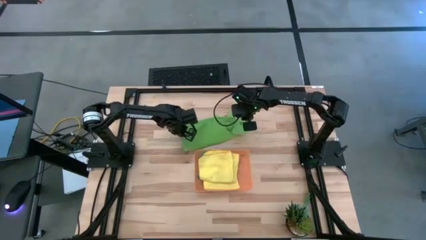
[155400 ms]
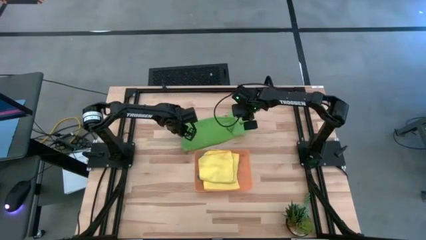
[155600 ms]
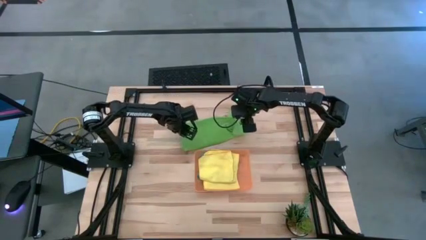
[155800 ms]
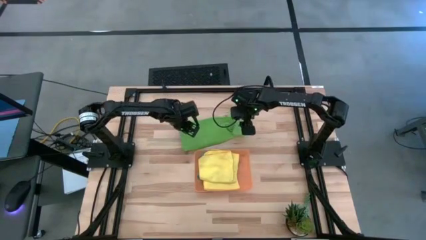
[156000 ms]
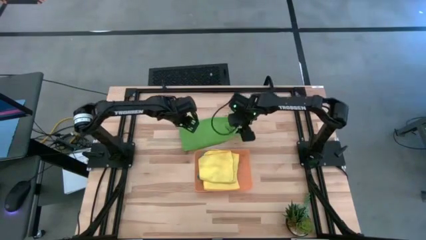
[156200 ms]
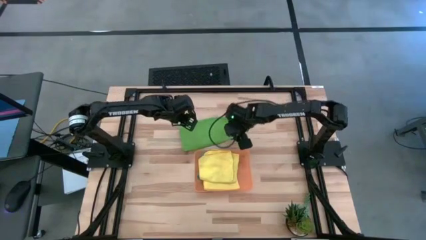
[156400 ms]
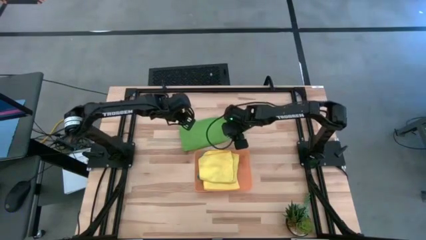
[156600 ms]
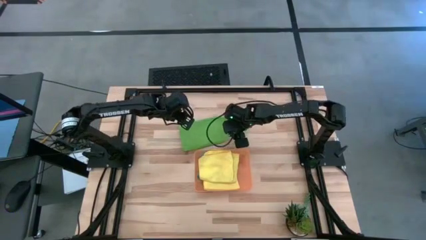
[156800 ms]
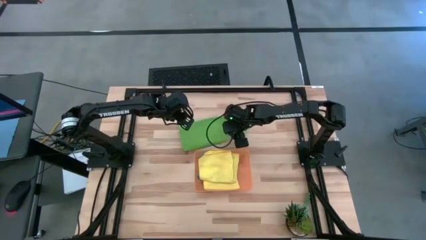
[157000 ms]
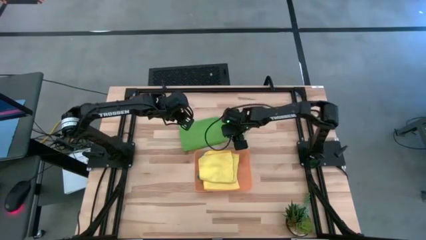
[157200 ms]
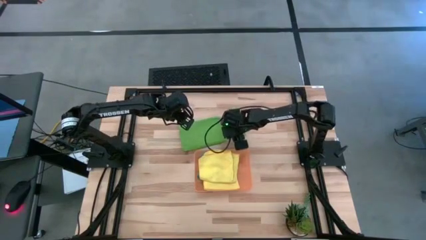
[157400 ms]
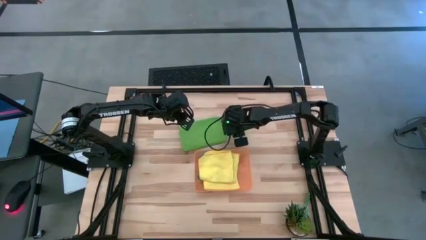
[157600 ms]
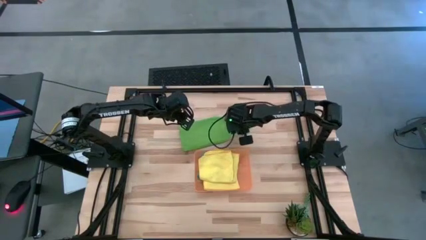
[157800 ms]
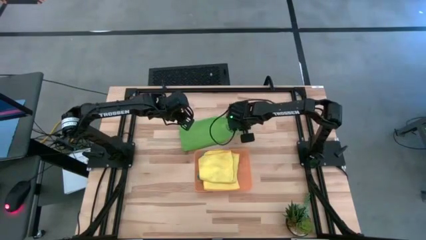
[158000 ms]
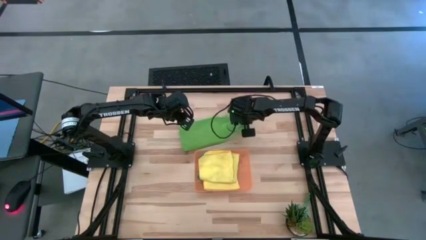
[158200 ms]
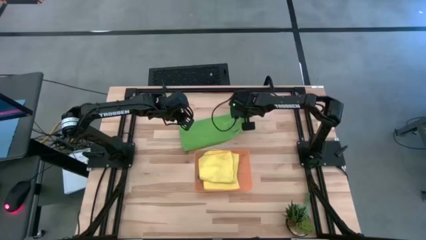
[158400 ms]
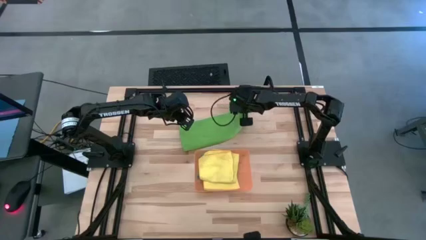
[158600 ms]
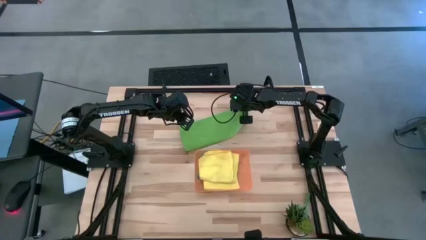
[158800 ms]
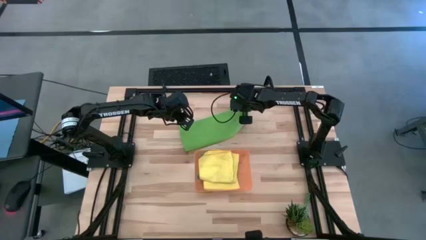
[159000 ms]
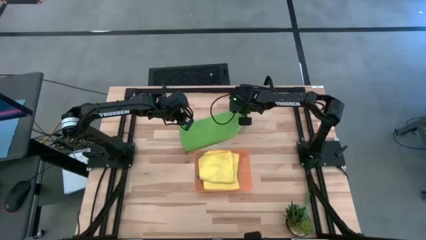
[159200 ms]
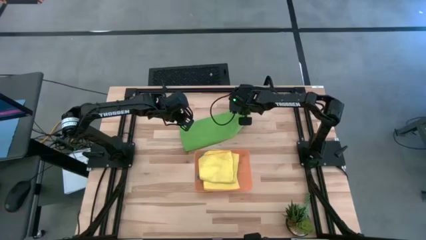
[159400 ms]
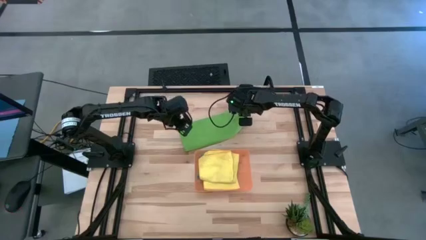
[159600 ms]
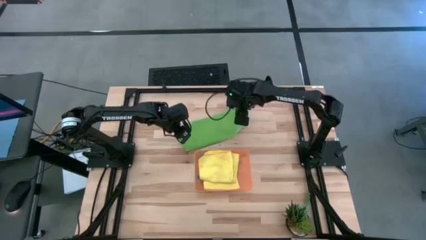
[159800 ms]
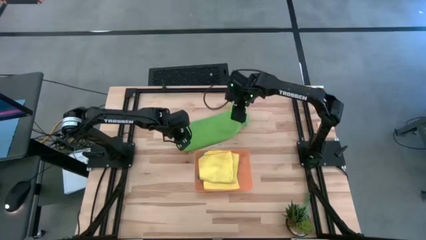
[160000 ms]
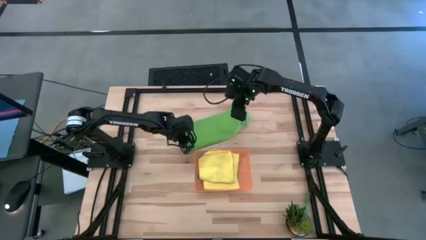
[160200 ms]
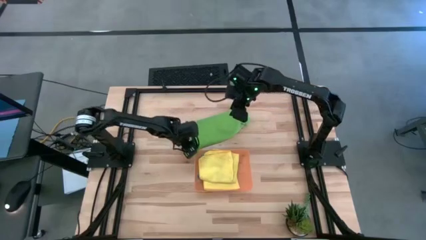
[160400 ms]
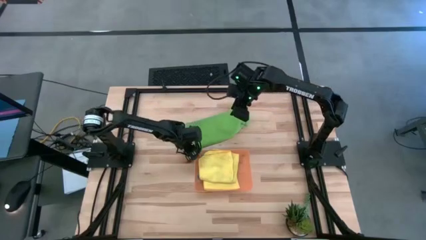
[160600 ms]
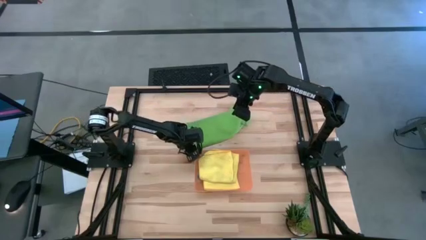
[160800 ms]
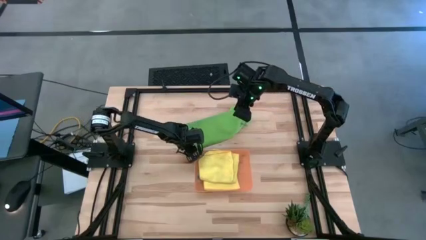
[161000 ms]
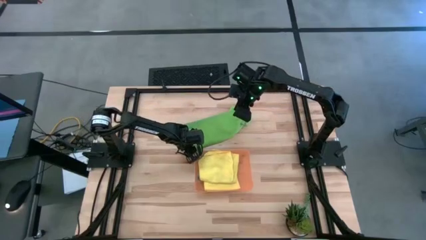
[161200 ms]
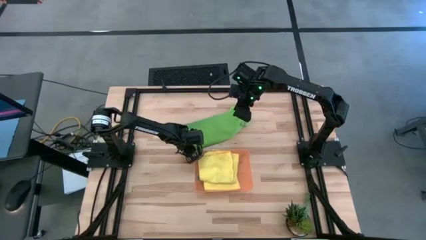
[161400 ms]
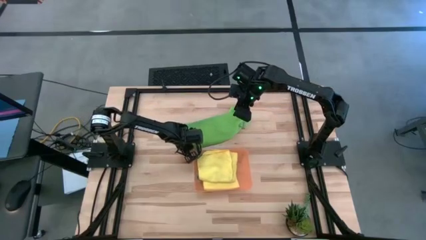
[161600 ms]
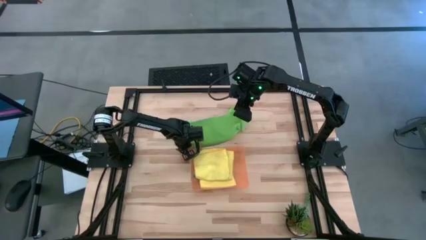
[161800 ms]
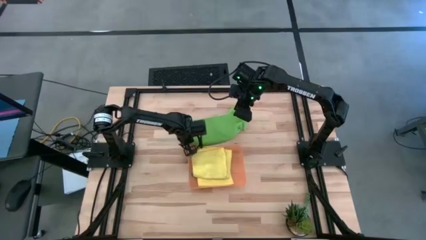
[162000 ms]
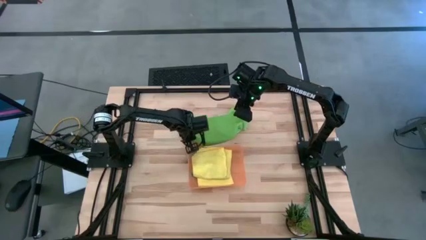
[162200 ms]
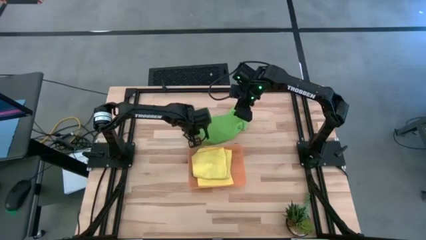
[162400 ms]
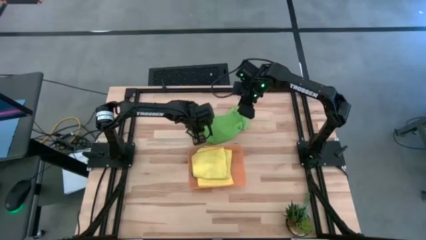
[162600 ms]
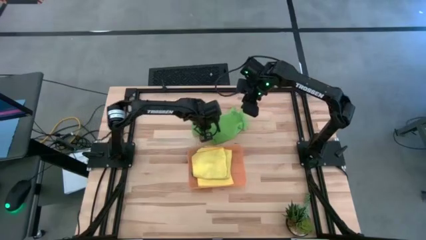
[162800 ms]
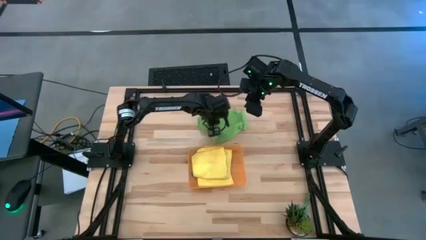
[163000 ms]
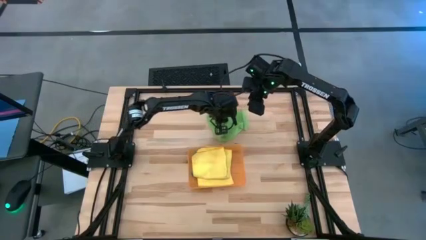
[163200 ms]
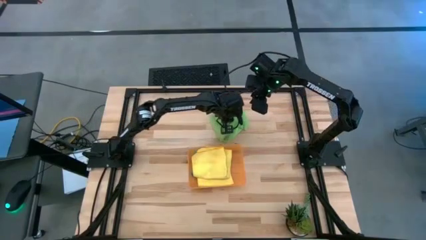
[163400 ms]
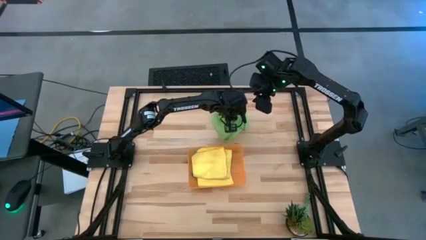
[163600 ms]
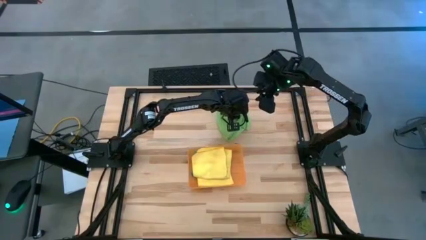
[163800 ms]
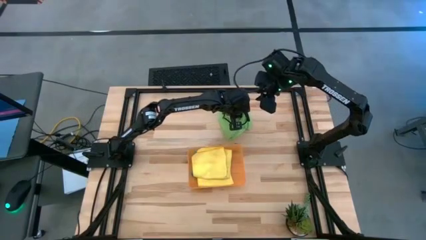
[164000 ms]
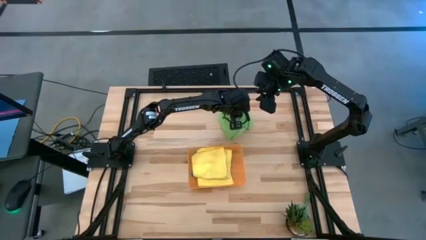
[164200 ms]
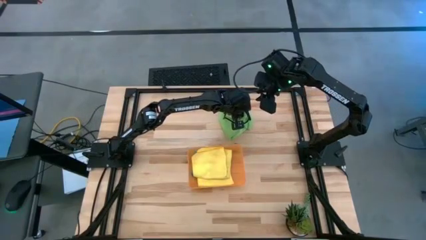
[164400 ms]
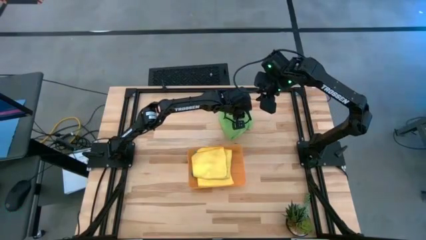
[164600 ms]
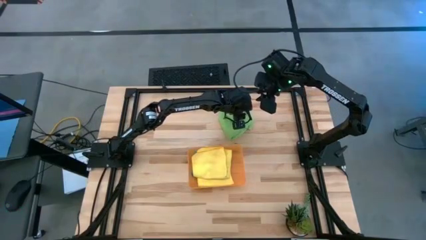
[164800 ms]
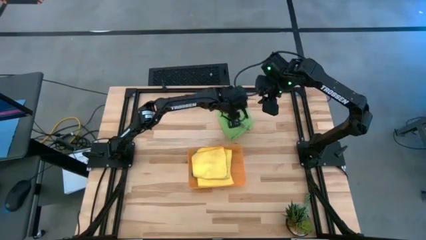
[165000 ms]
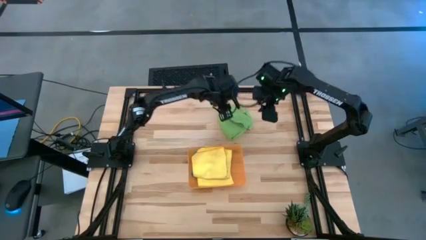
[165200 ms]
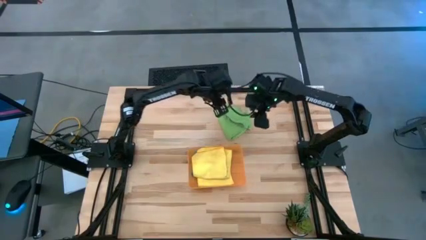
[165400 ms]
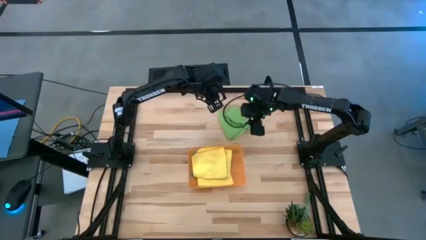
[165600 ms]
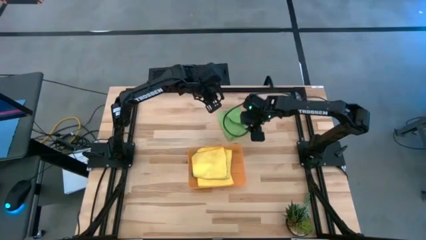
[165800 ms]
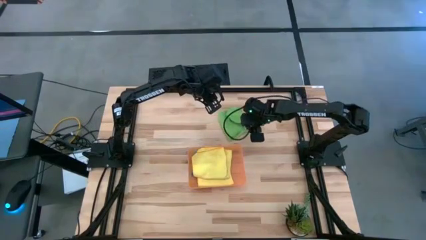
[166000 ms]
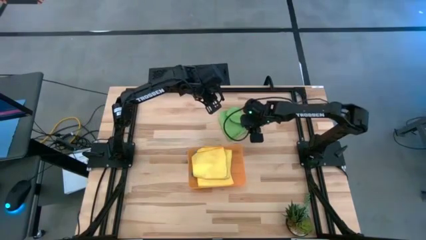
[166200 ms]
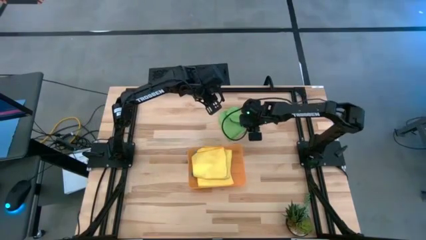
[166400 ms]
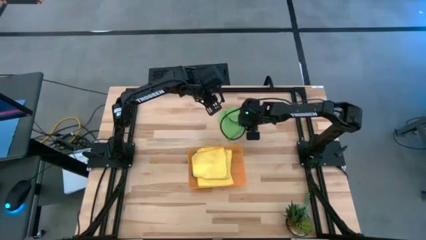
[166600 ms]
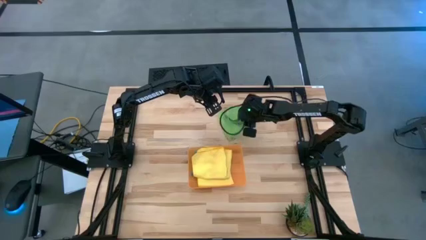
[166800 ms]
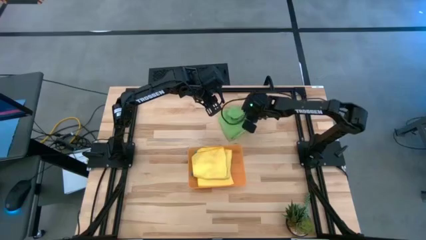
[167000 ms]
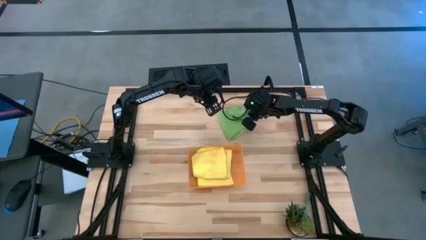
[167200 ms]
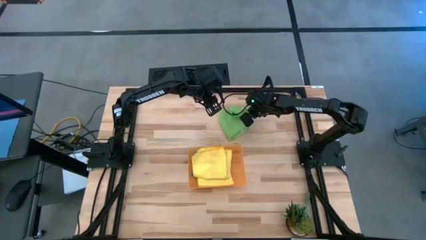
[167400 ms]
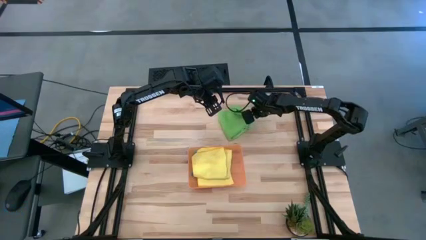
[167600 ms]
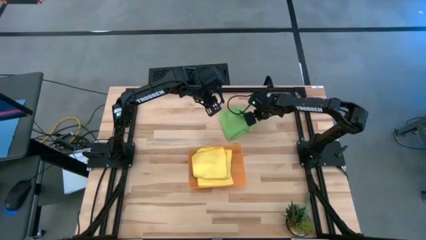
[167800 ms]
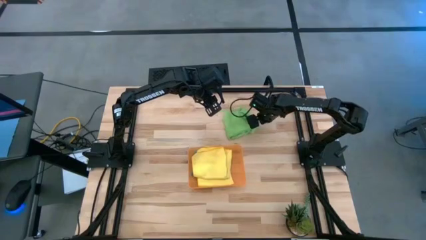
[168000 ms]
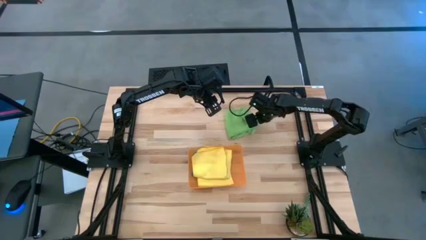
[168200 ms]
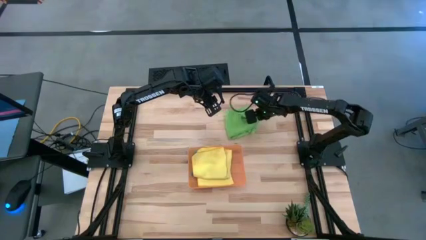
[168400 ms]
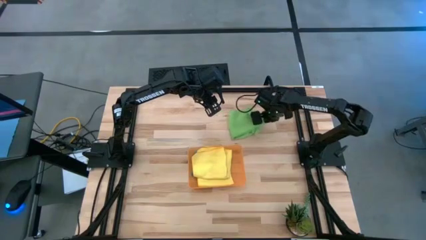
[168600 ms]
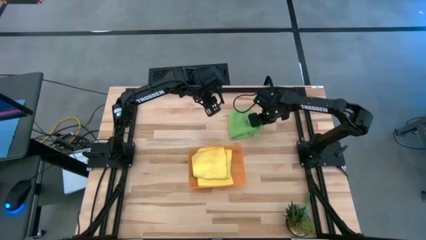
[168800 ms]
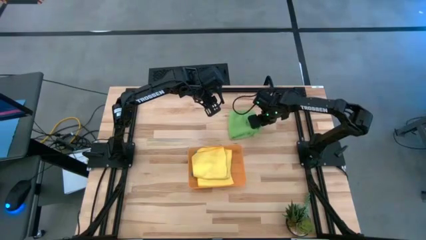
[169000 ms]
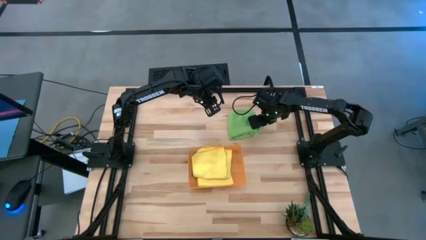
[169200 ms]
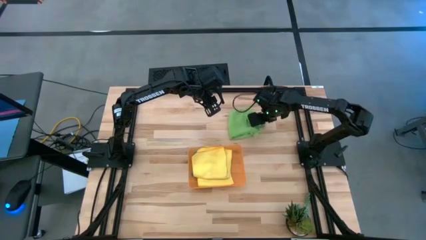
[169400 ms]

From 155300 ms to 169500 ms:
Task: Fold microfiber towels
Fold the green towel
